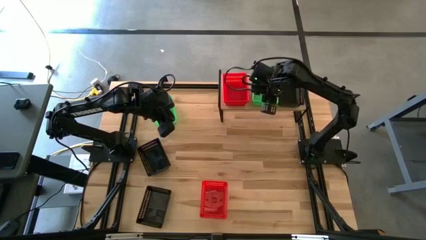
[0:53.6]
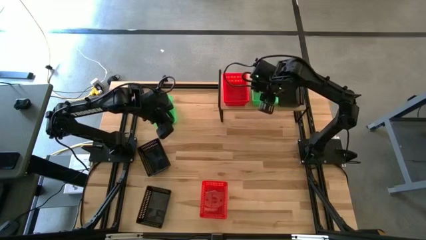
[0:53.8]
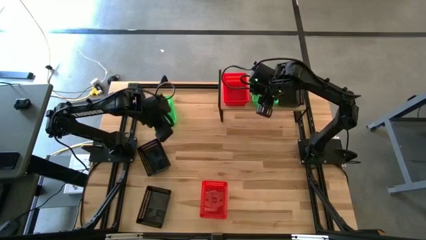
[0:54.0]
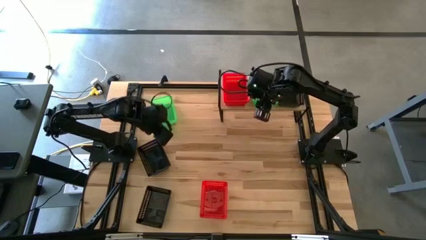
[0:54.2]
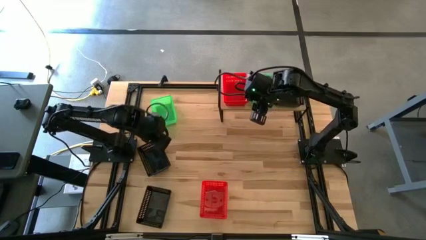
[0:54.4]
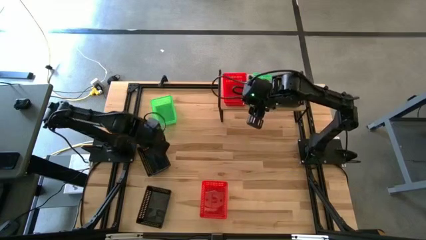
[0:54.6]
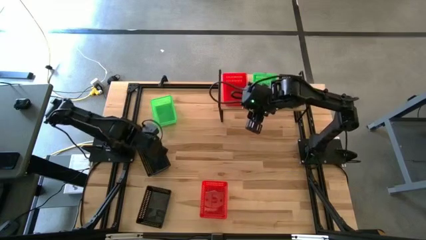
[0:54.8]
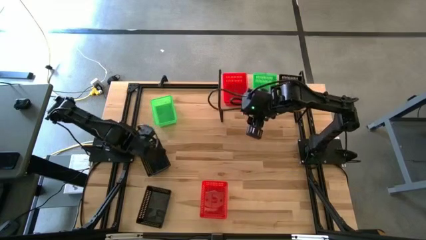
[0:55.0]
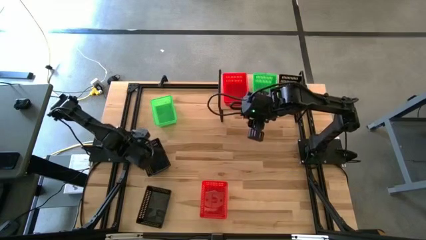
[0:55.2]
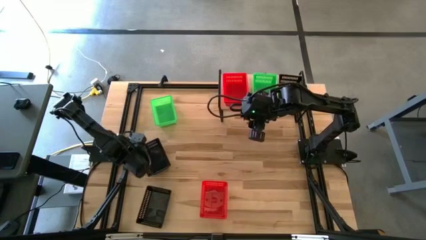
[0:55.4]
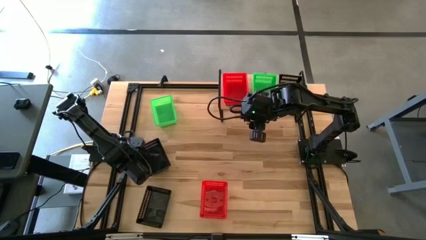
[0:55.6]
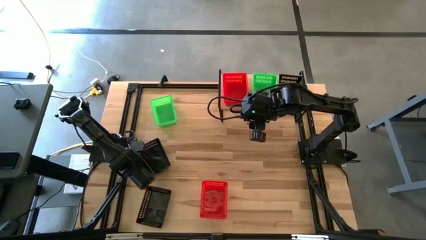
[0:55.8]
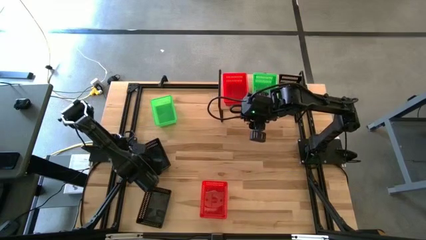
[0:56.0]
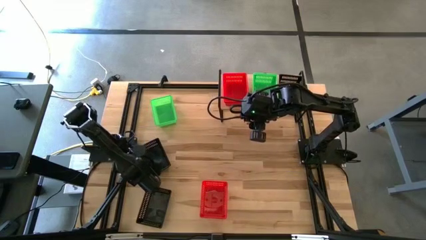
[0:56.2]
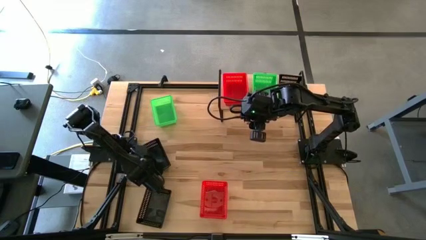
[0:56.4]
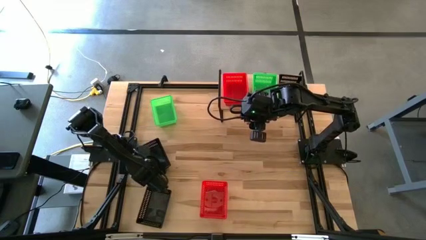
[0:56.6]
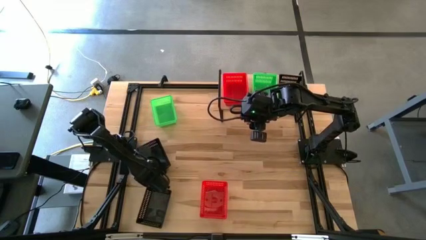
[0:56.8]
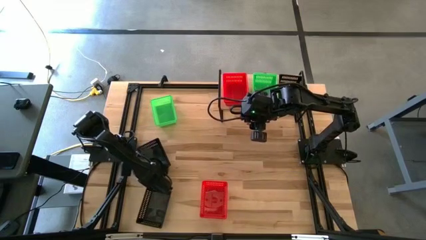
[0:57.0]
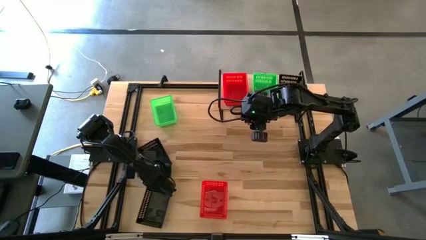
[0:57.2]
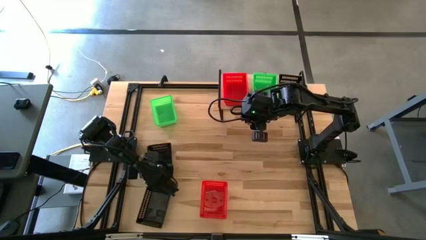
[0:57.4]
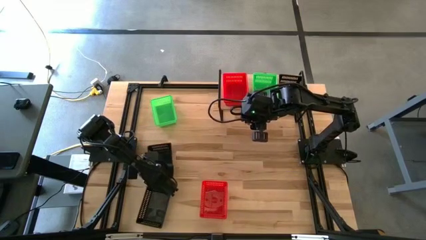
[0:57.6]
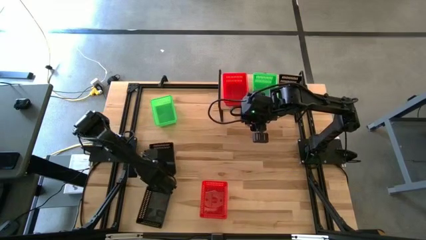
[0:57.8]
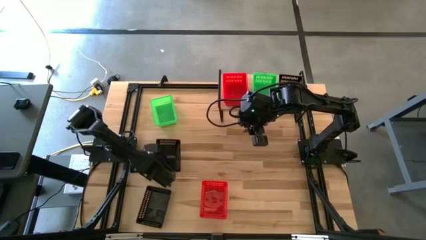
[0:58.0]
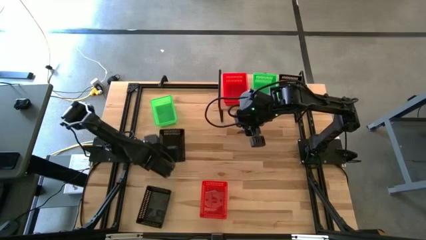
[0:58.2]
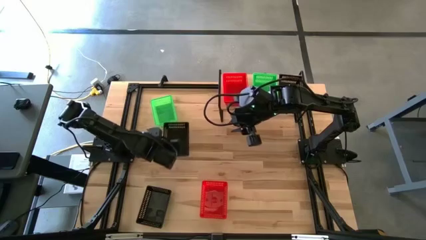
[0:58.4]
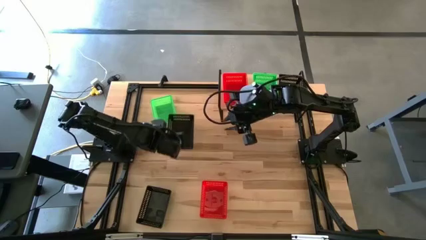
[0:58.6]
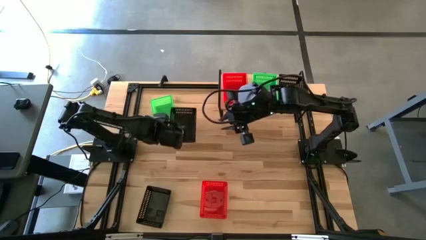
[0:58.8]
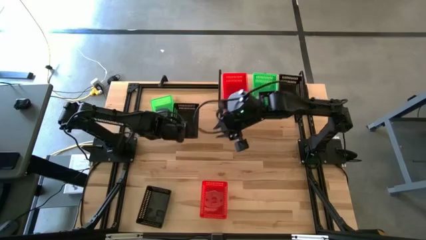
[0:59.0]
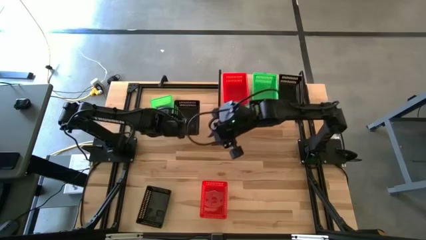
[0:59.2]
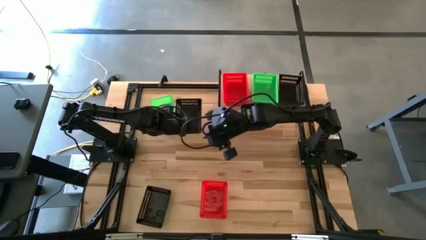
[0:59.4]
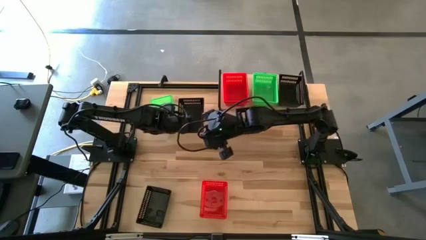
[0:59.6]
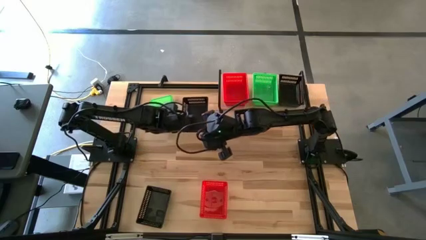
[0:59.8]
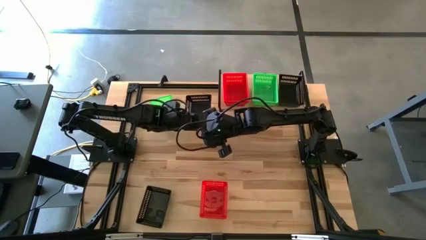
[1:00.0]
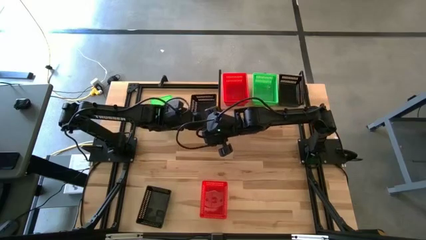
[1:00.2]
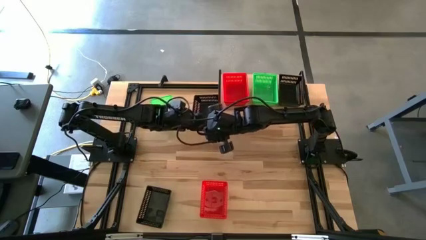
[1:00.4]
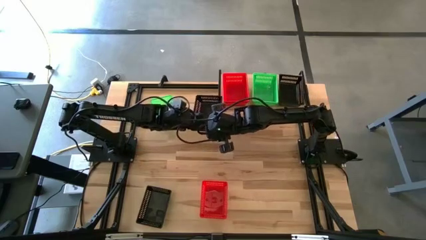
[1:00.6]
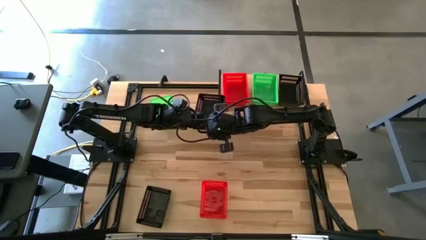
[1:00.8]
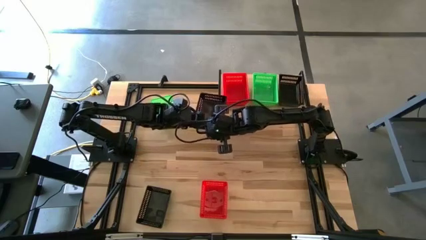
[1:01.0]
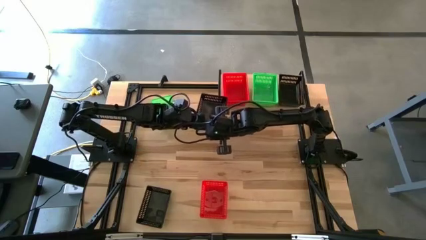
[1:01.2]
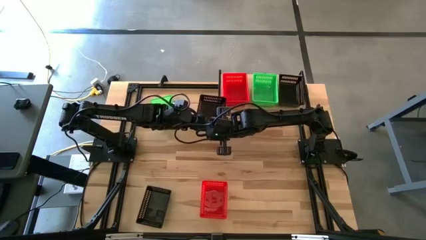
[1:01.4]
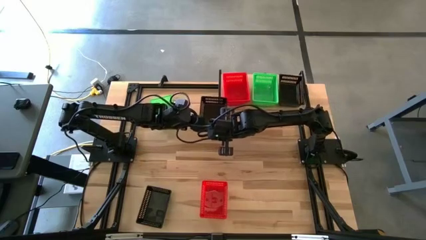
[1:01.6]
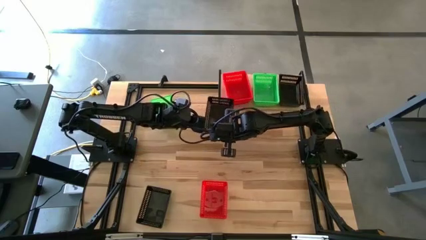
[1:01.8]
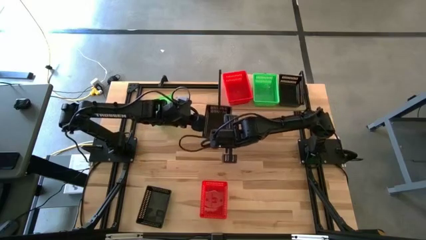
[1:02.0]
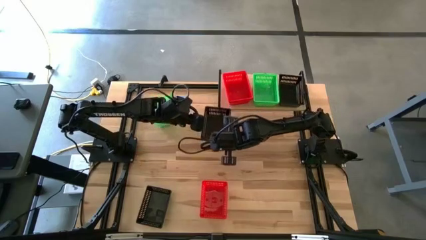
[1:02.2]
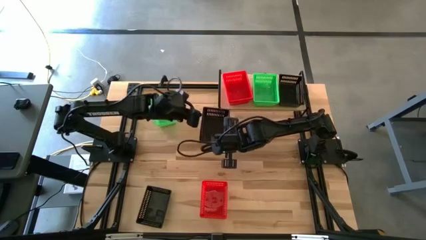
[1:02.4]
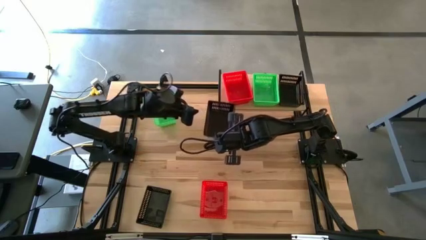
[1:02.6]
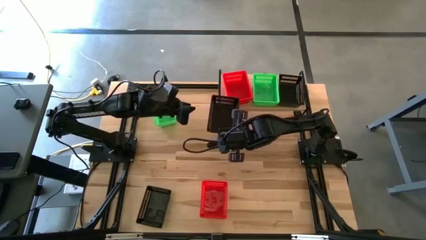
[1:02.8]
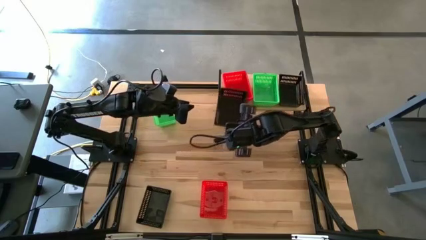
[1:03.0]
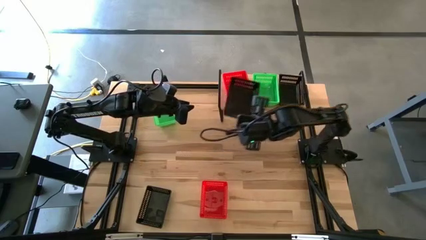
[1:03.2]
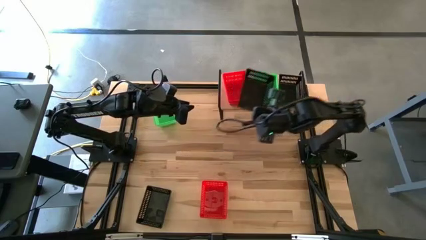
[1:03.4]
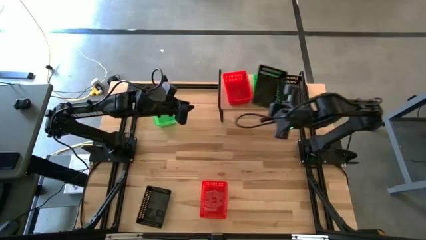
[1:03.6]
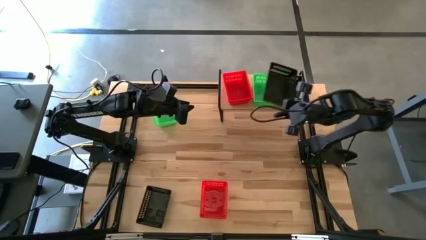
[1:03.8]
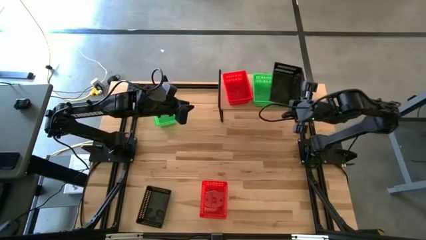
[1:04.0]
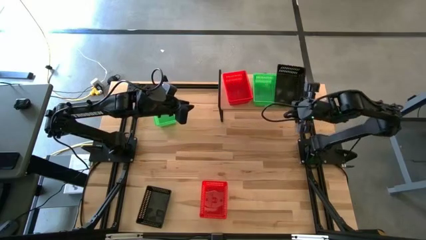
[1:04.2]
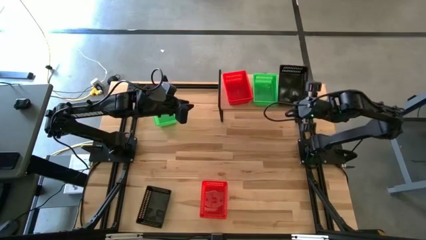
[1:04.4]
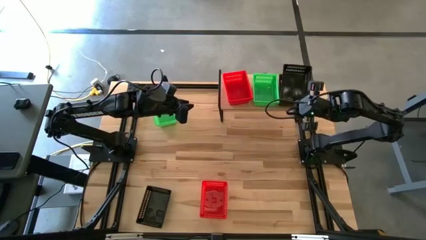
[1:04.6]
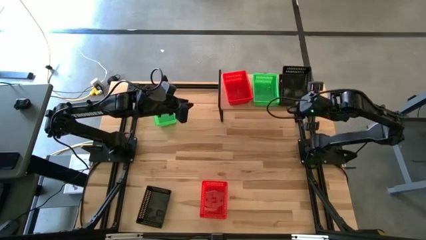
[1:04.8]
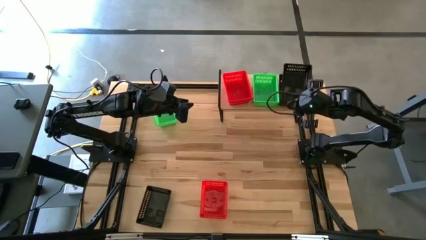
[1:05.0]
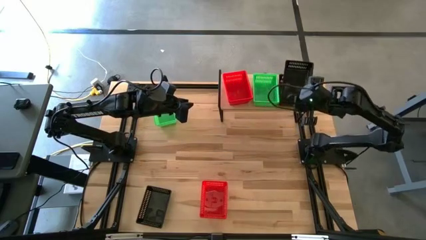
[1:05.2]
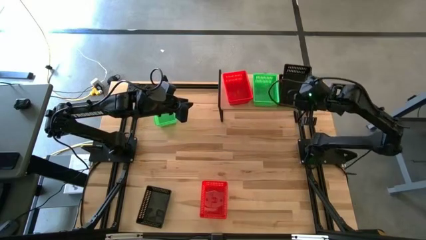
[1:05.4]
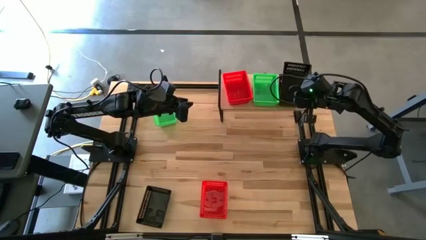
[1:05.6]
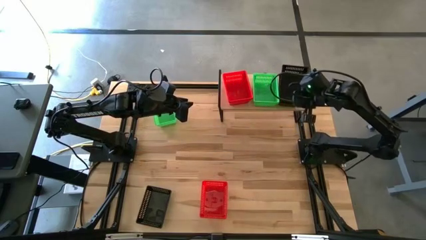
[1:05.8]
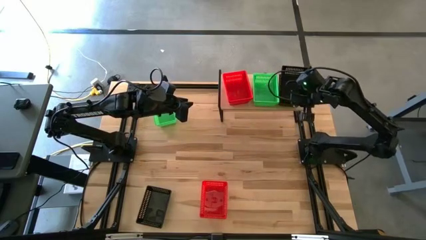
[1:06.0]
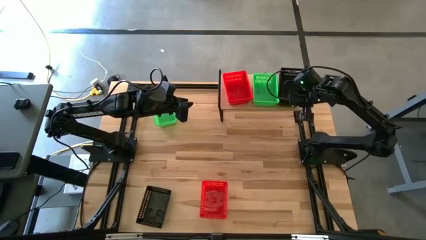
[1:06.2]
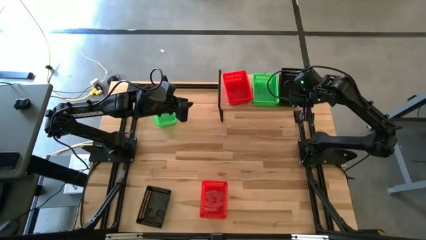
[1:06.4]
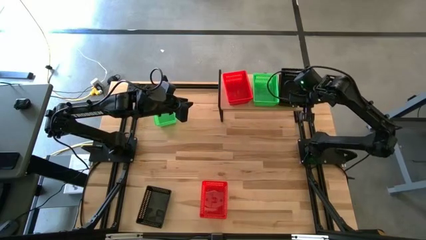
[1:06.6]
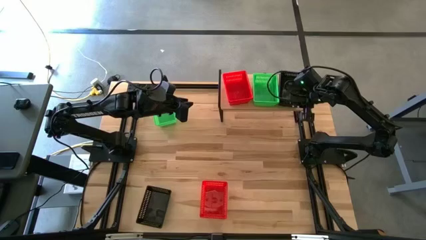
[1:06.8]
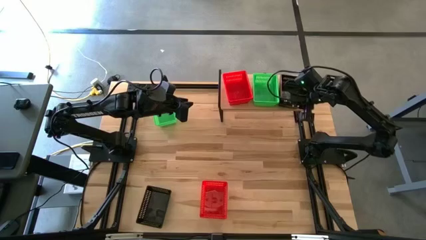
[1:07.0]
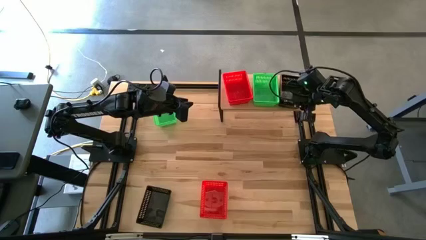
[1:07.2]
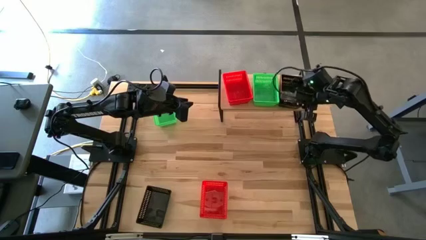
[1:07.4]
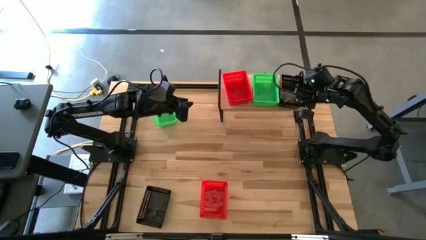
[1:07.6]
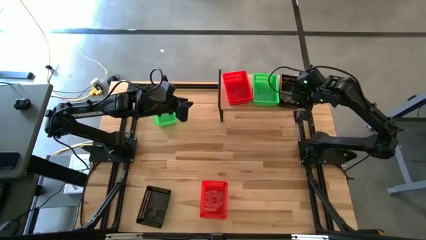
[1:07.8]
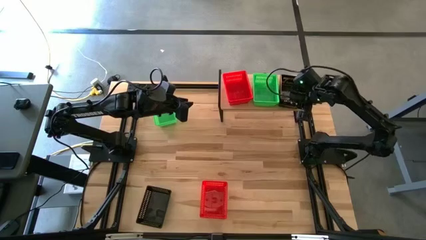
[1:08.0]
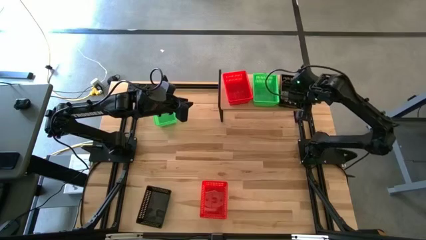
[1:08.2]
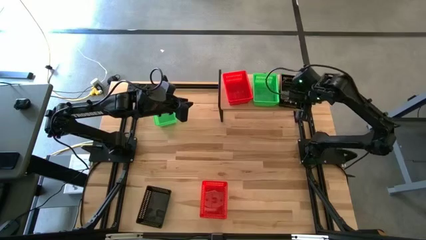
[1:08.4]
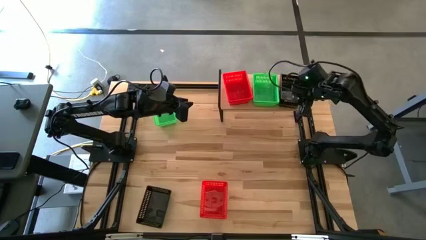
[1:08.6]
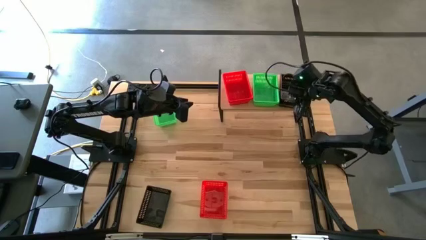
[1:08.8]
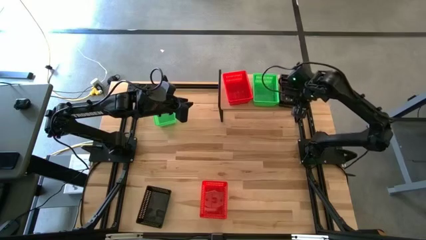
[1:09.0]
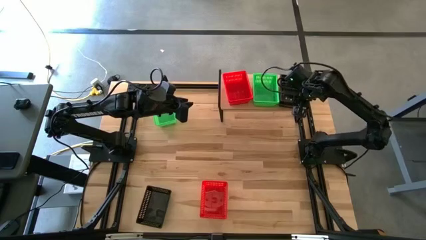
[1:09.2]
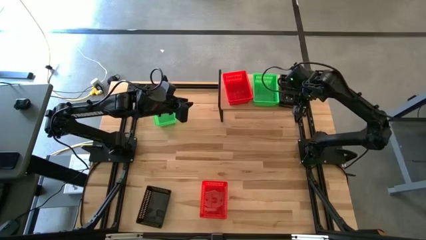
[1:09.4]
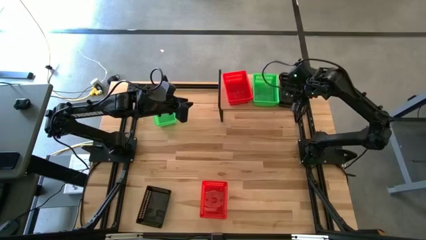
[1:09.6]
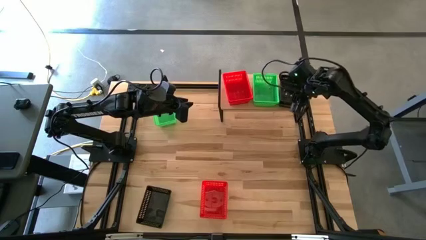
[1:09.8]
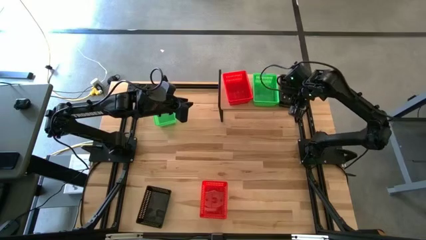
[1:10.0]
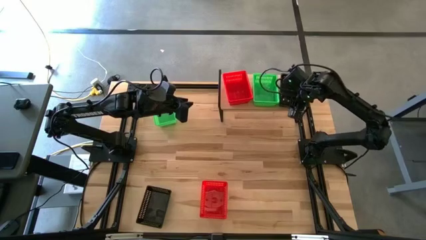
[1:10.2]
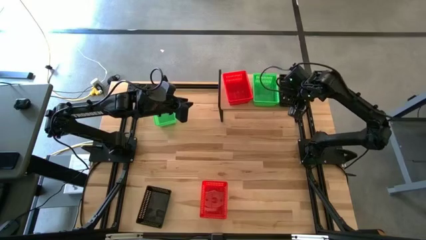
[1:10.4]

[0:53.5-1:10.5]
Task: Stack baskets on shelf by color
Stack the top black bin on top of the black bin
